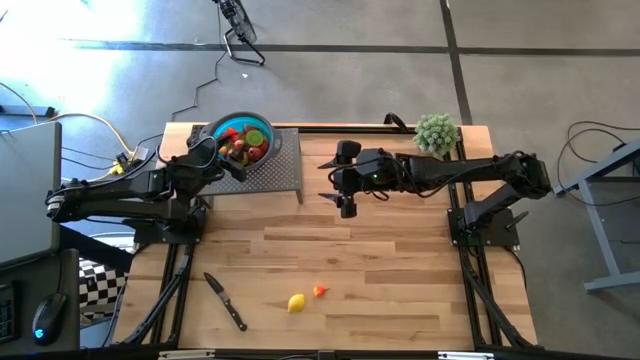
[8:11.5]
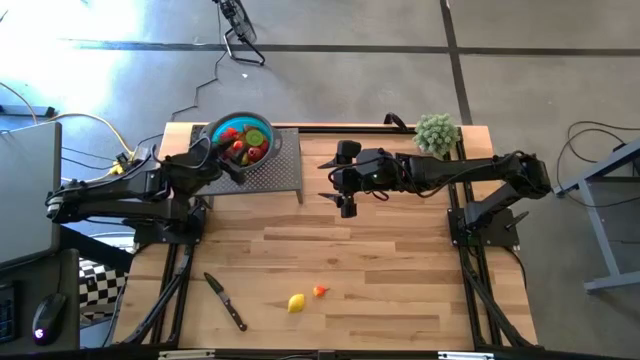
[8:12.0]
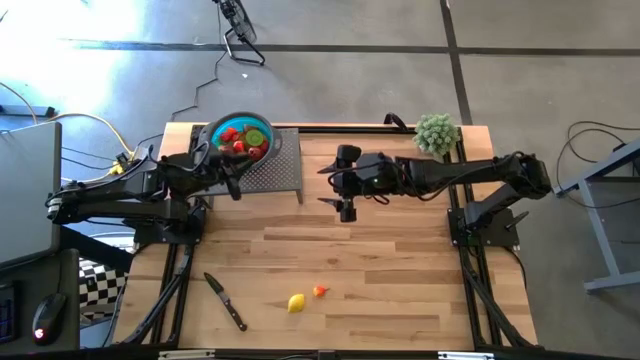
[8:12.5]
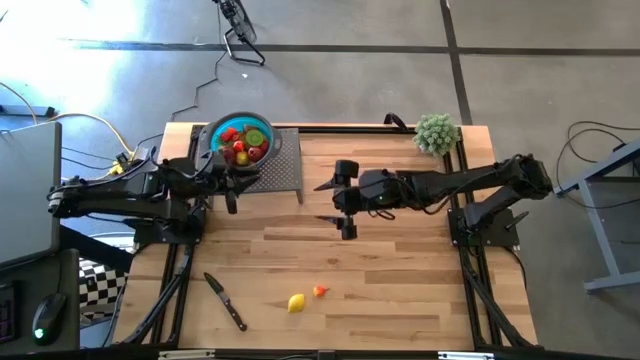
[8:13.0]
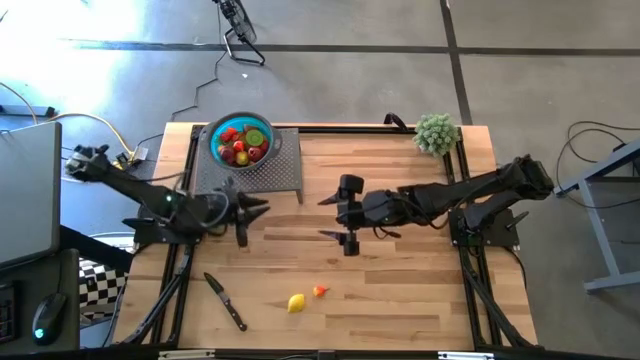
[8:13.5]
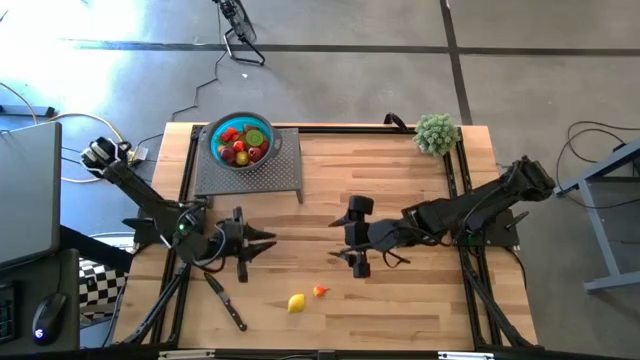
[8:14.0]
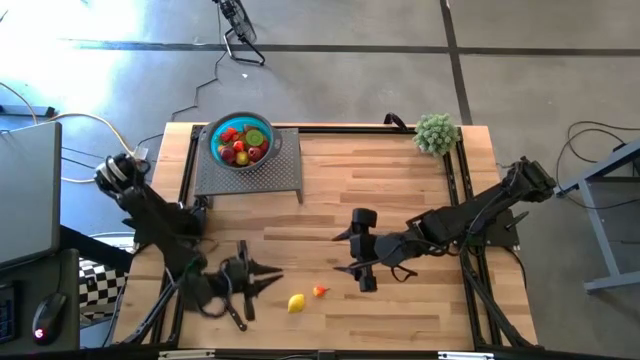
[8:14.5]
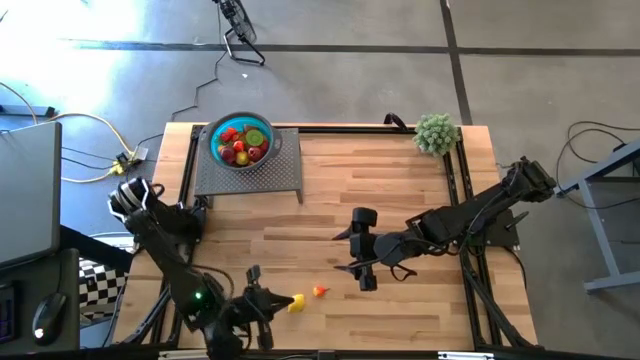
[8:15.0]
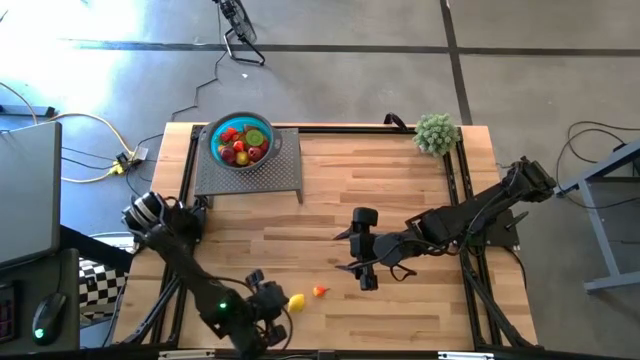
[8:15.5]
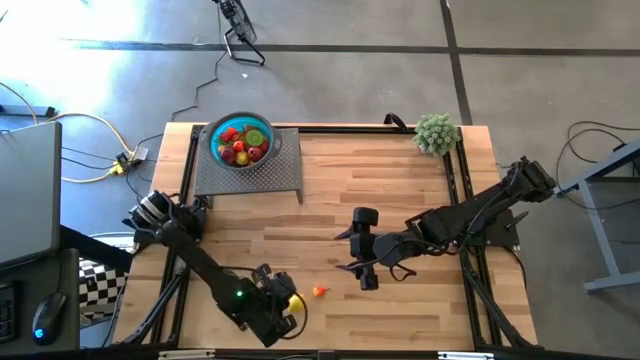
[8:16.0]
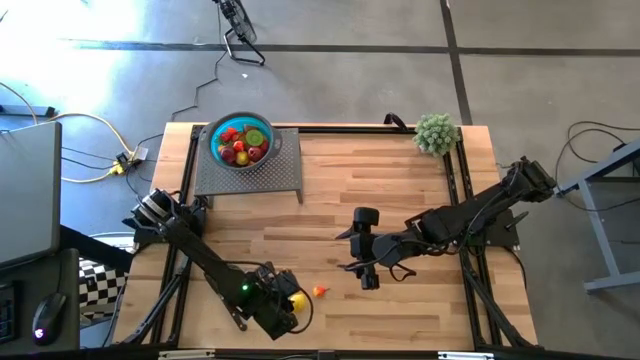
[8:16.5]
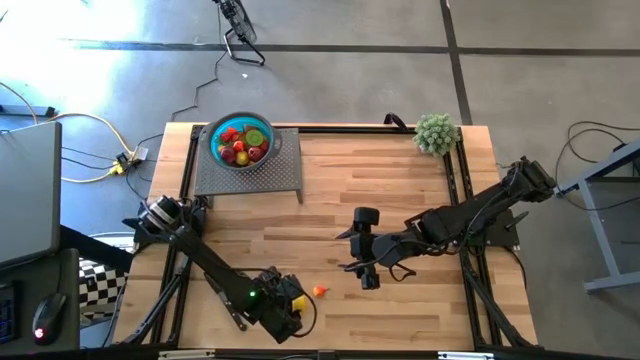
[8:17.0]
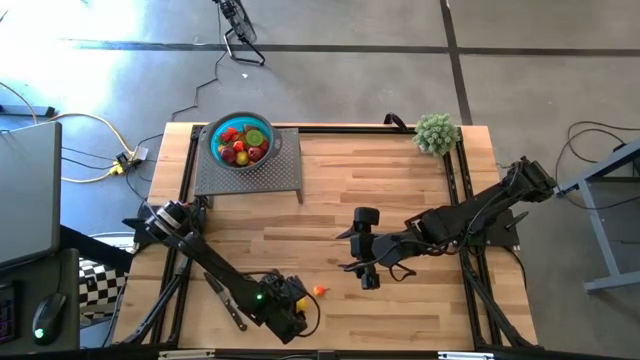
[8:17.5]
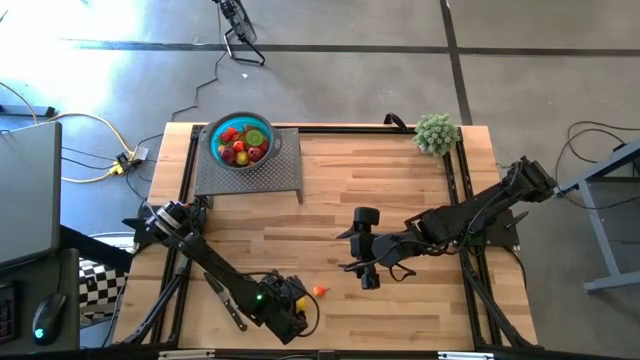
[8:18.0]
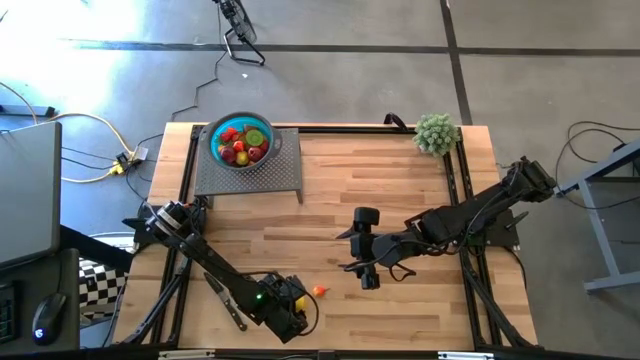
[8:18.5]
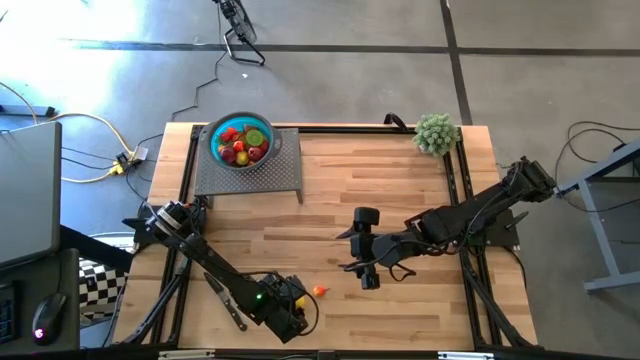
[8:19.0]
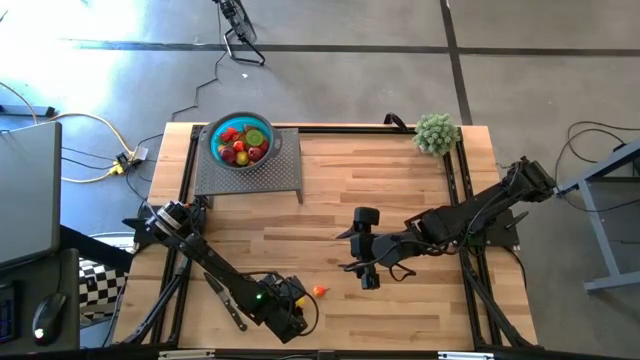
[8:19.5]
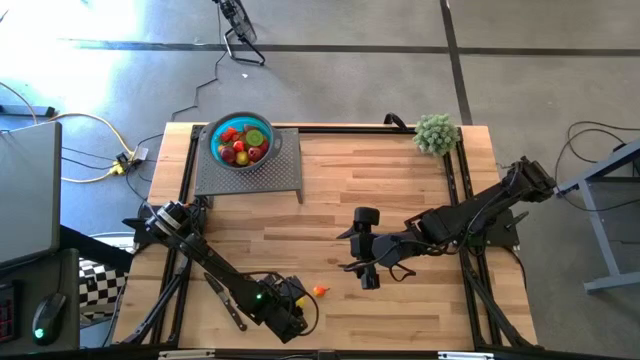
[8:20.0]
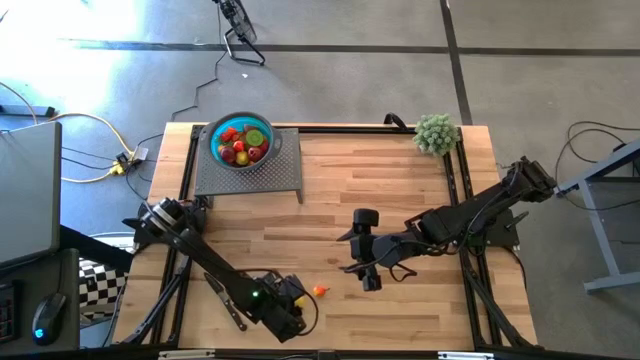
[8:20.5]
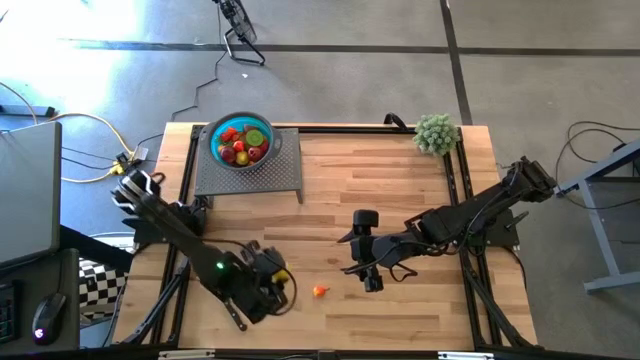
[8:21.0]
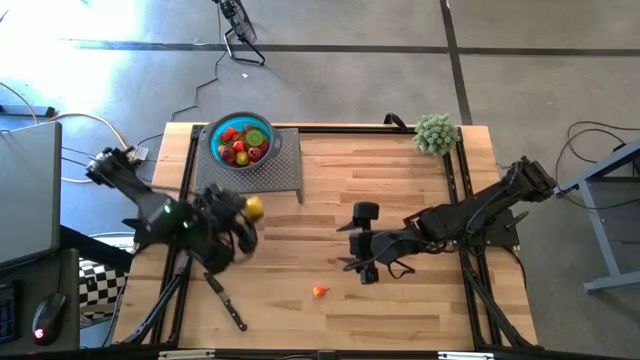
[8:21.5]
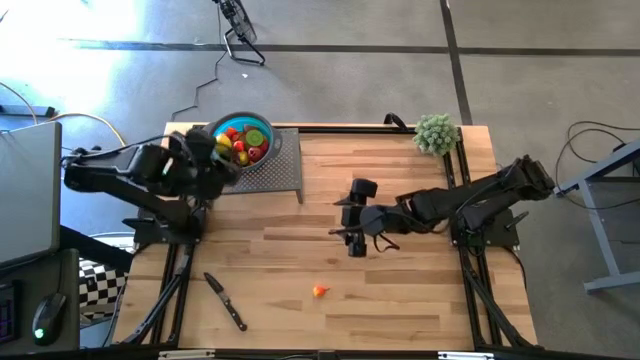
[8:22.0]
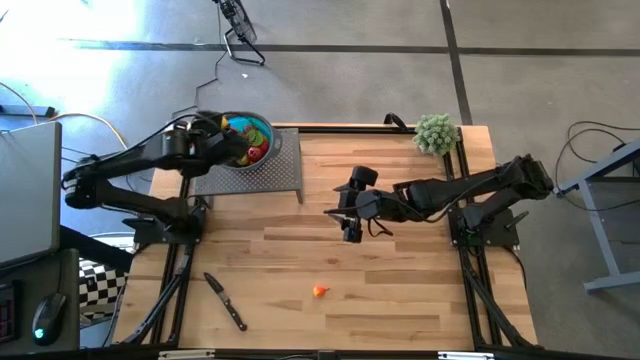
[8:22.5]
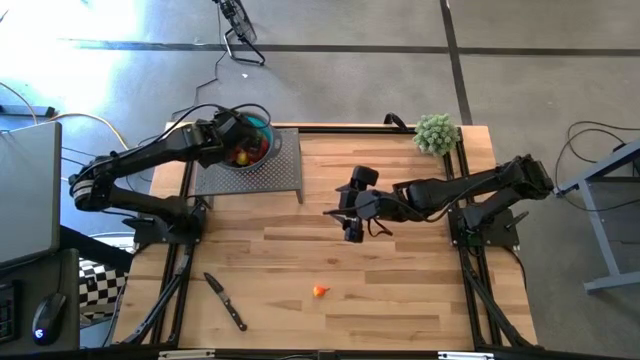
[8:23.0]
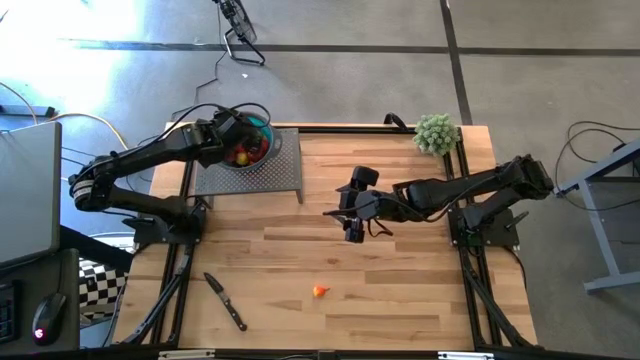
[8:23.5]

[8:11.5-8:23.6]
Task: Pick & Place Fruit
Put the lemon into the blue strainer bowl on the shelf

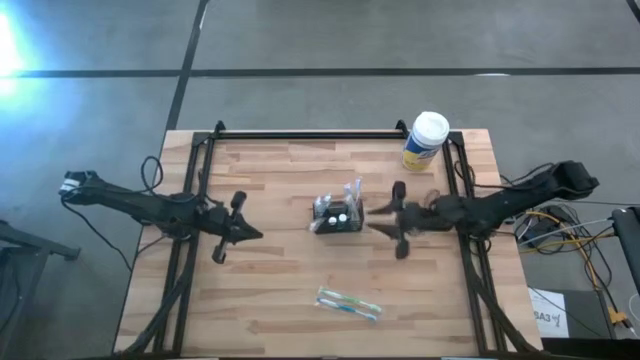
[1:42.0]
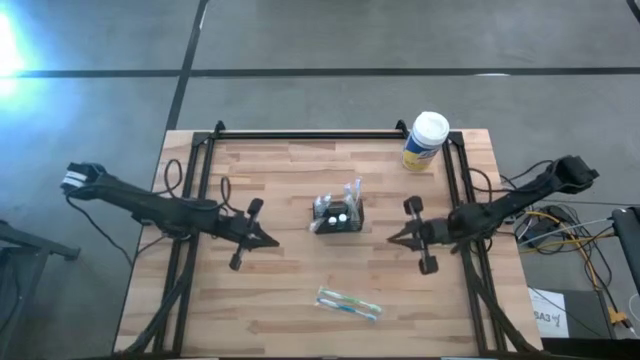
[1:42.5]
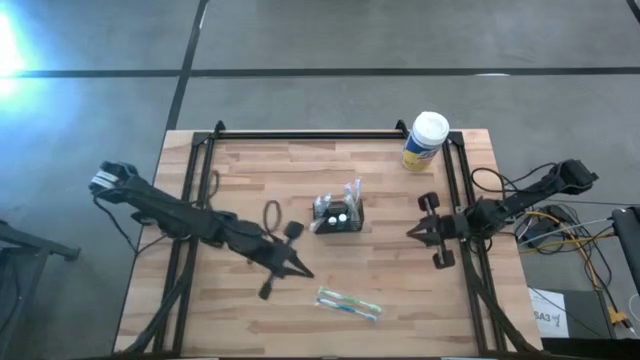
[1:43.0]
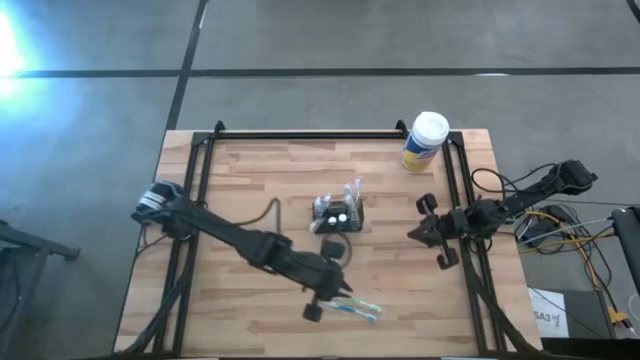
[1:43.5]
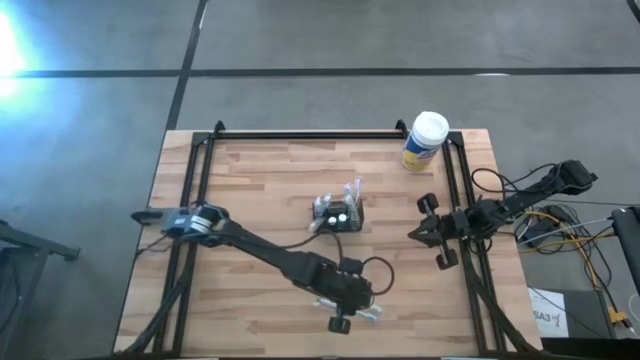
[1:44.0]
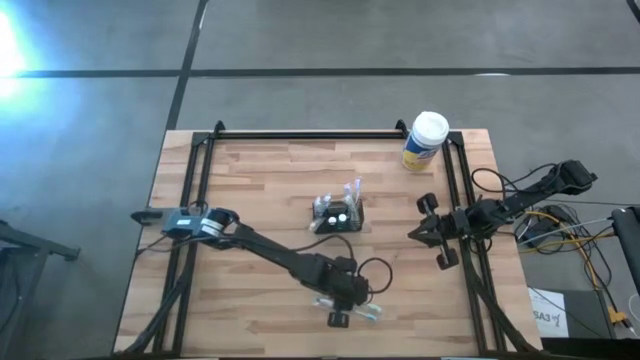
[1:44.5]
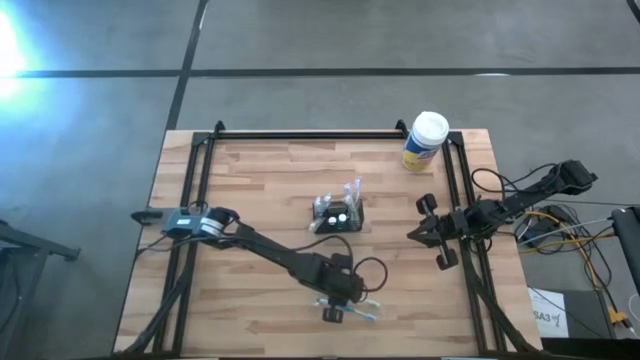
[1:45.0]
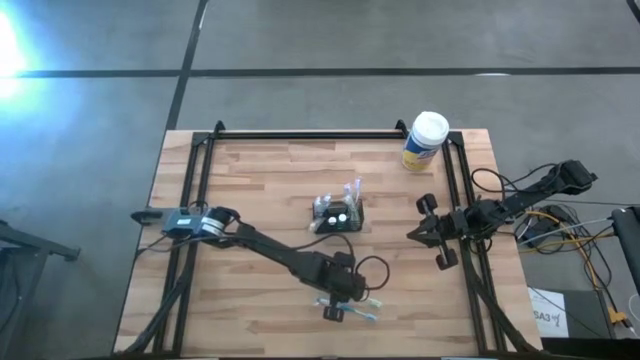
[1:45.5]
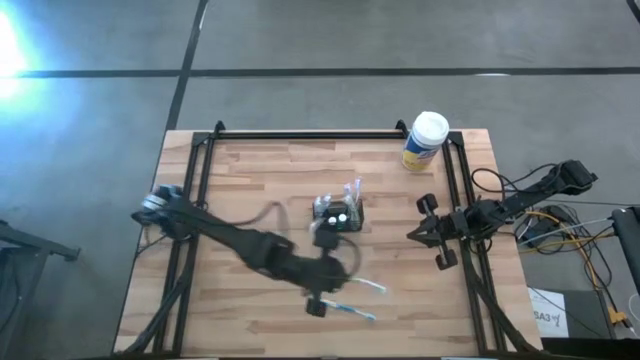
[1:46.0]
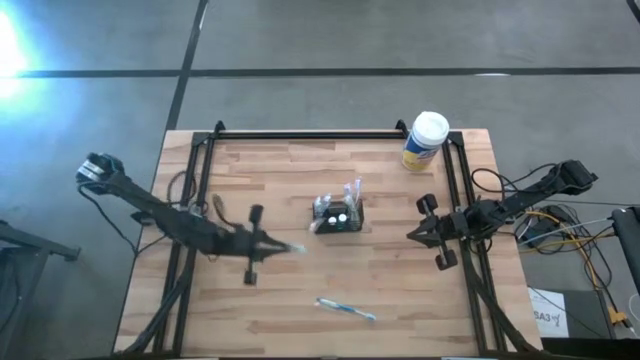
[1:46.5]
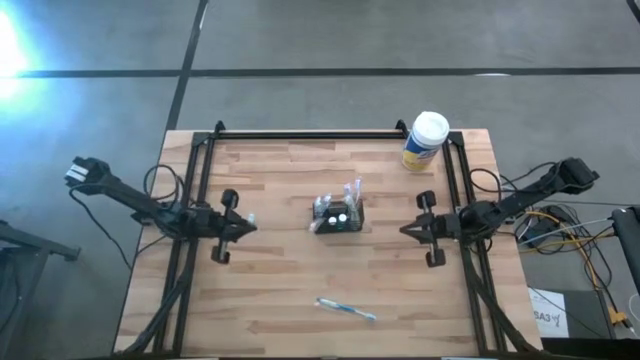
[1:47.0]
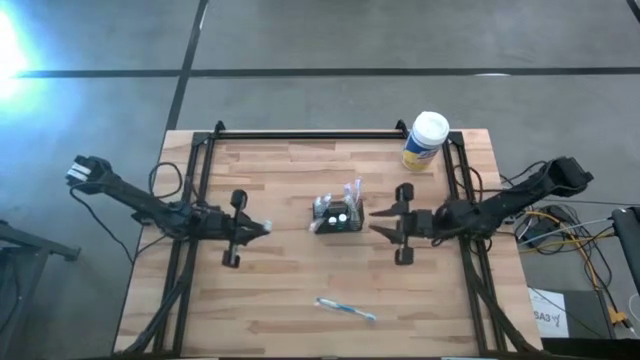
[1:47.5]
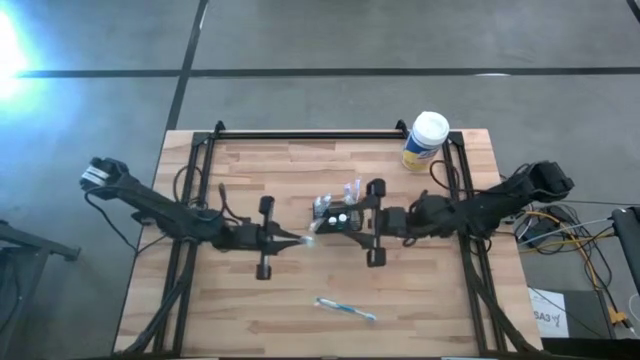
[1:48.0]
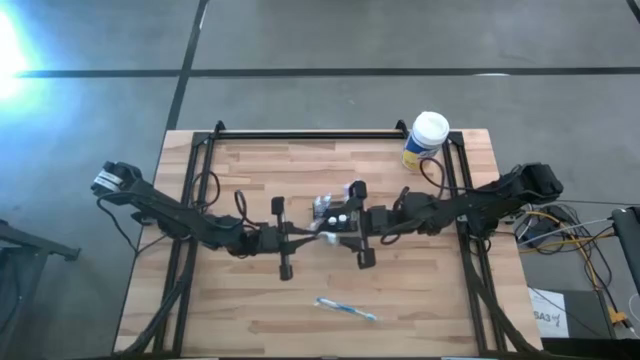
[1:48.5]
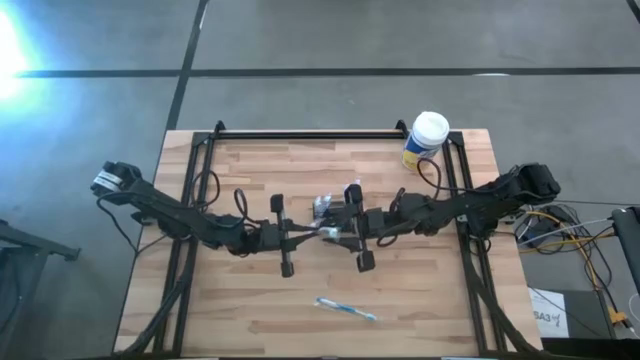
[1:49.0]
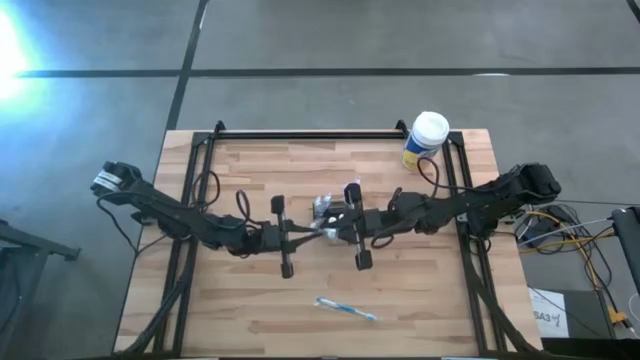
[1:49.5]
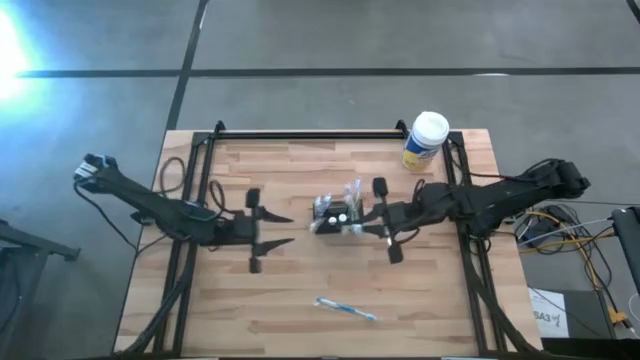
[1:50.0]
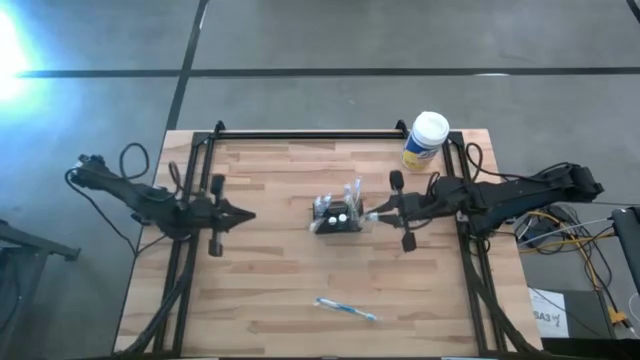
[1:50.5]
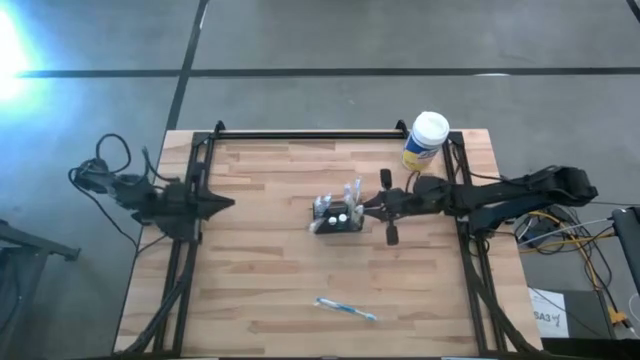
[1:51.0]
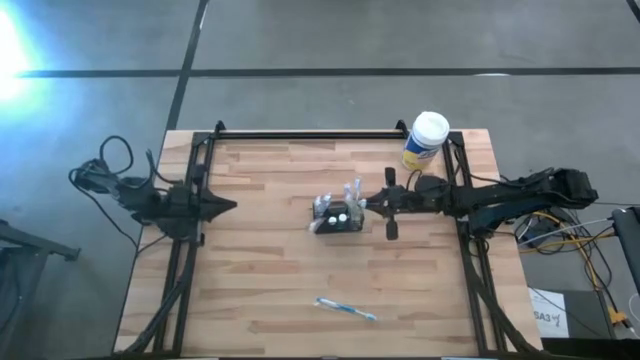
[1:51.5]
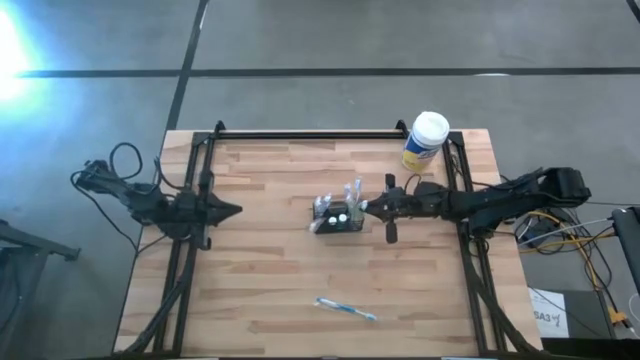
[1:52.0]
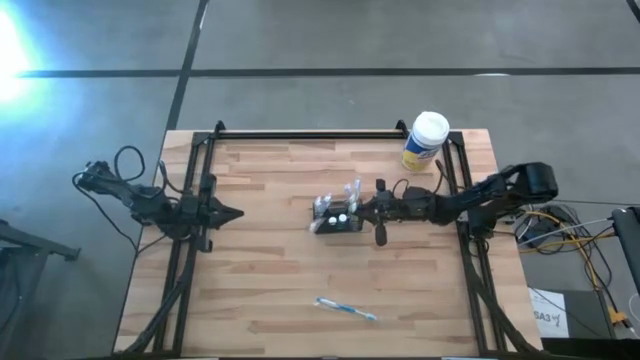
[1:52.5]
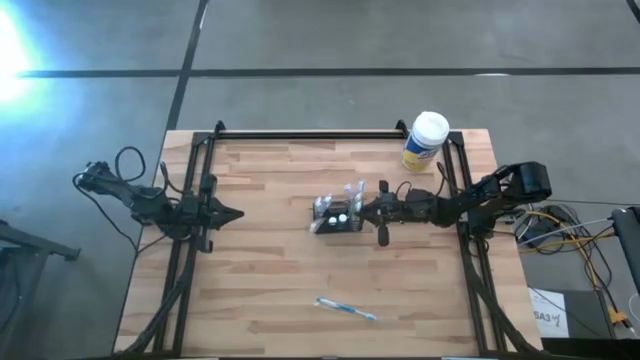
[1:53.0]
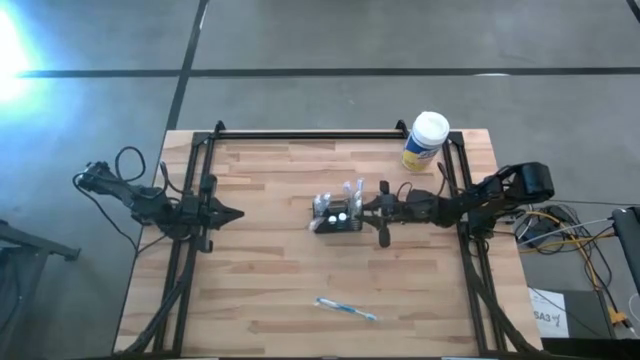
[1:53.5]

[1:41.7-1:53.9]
Task: Pick & Place toothbrushing station
Put the green toothbrush into the wire organizer
